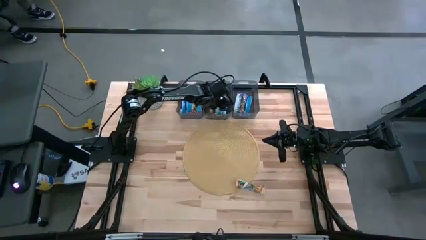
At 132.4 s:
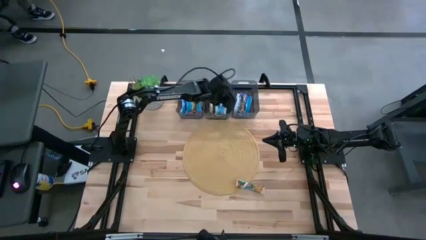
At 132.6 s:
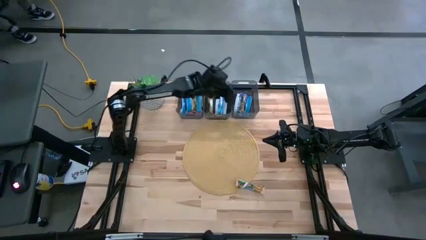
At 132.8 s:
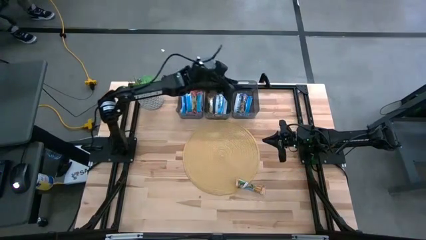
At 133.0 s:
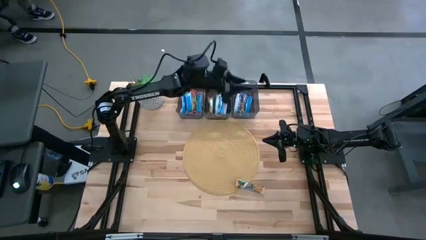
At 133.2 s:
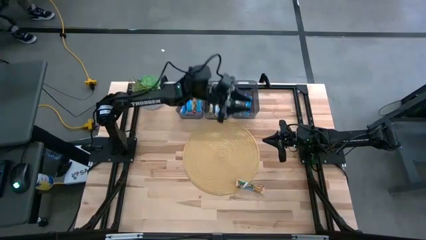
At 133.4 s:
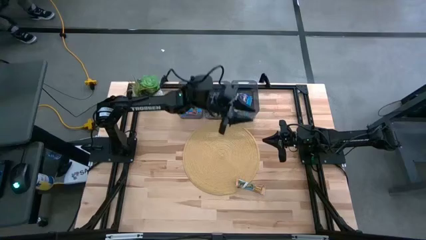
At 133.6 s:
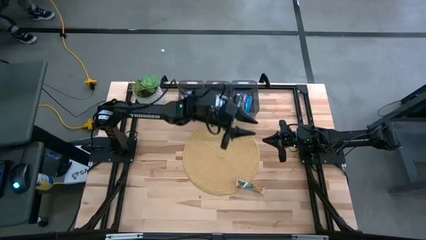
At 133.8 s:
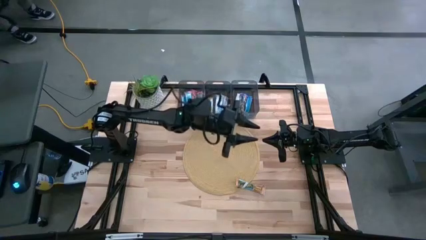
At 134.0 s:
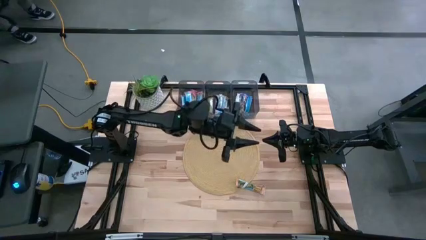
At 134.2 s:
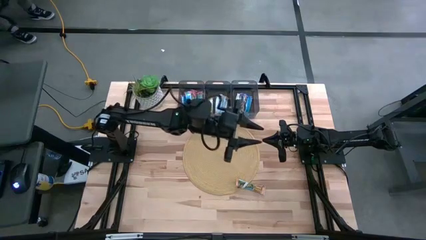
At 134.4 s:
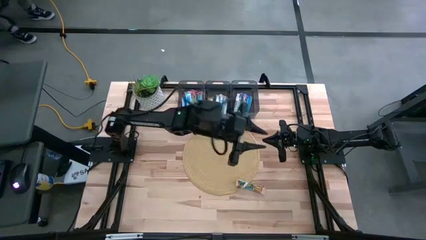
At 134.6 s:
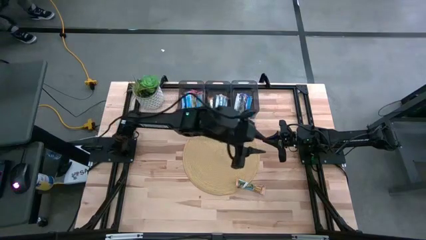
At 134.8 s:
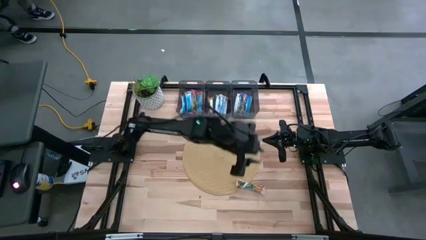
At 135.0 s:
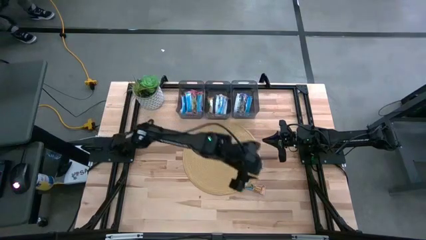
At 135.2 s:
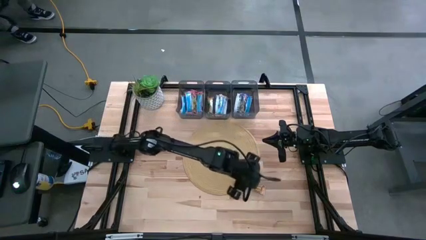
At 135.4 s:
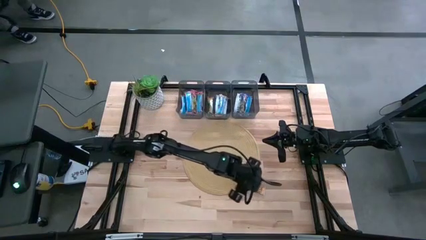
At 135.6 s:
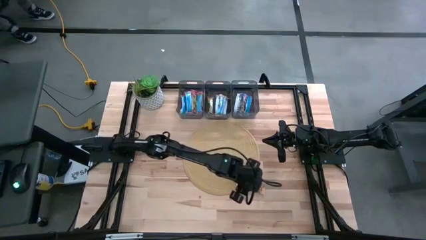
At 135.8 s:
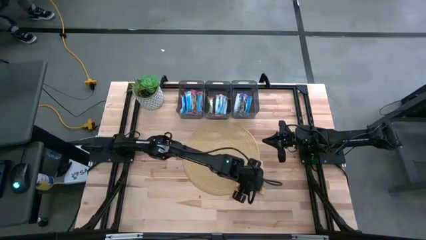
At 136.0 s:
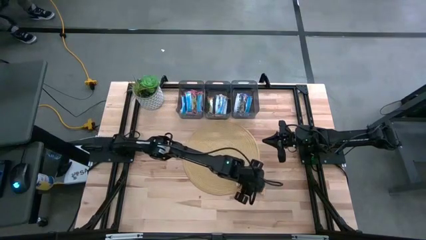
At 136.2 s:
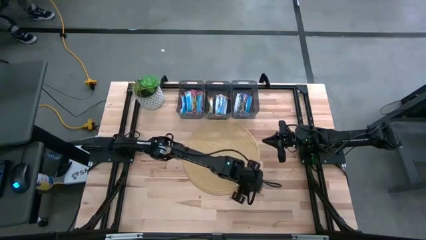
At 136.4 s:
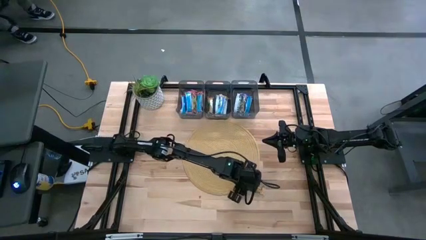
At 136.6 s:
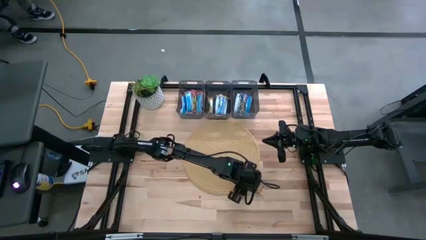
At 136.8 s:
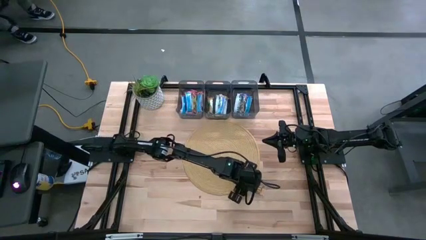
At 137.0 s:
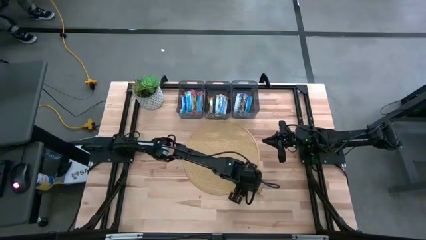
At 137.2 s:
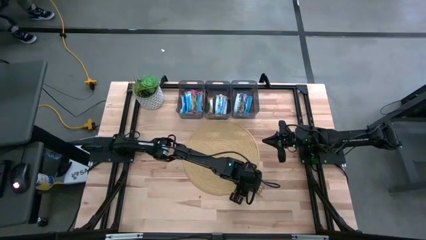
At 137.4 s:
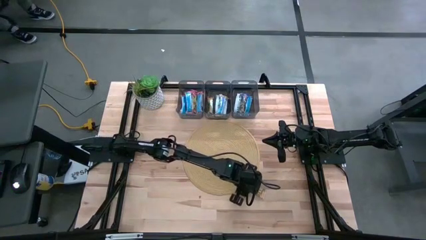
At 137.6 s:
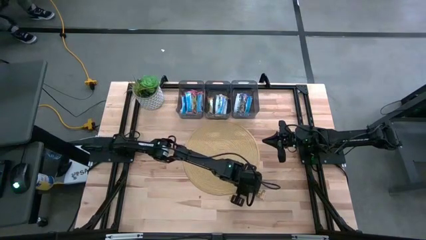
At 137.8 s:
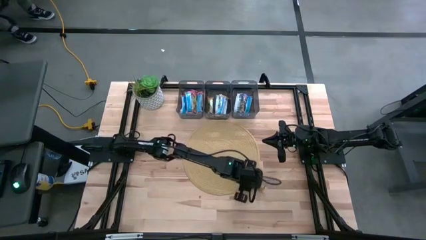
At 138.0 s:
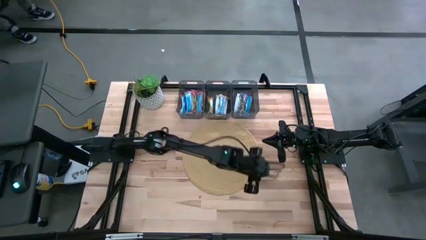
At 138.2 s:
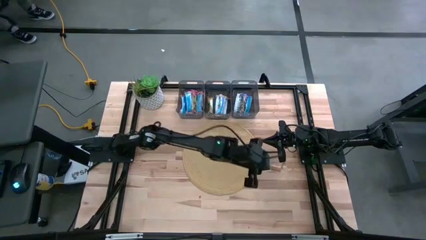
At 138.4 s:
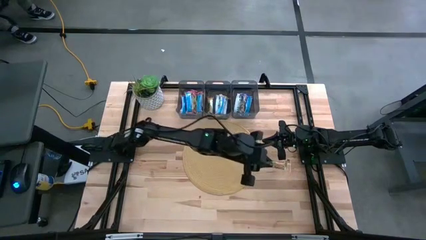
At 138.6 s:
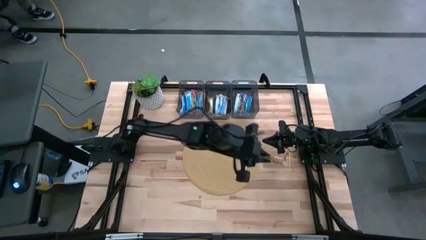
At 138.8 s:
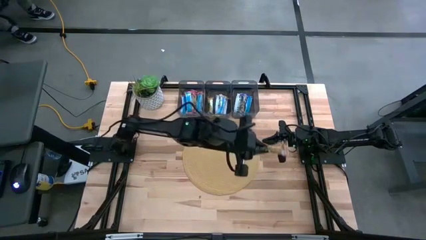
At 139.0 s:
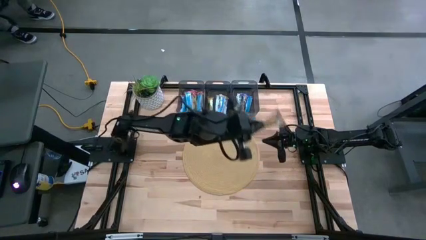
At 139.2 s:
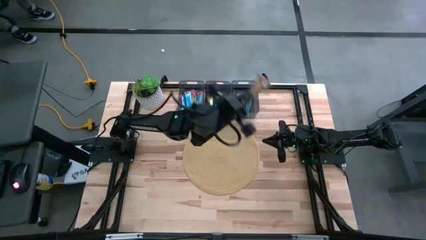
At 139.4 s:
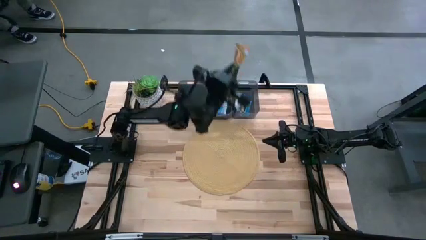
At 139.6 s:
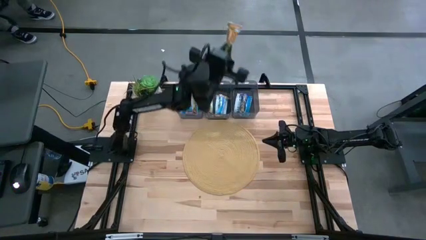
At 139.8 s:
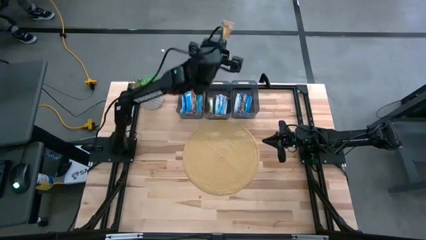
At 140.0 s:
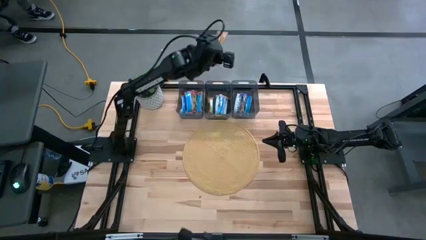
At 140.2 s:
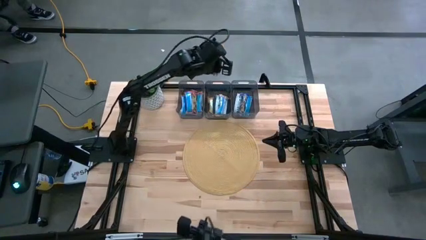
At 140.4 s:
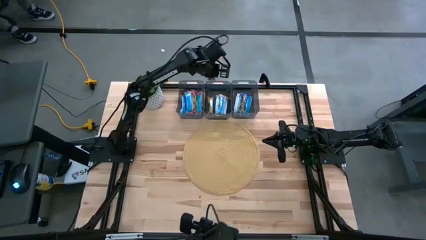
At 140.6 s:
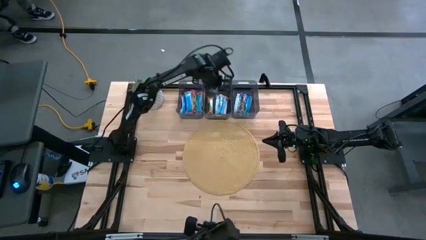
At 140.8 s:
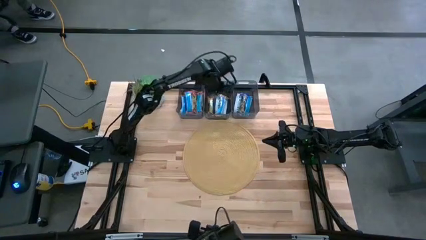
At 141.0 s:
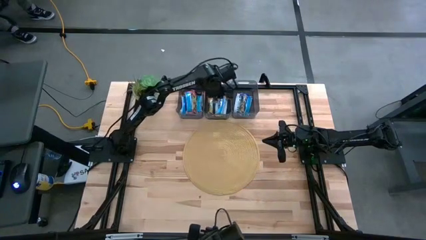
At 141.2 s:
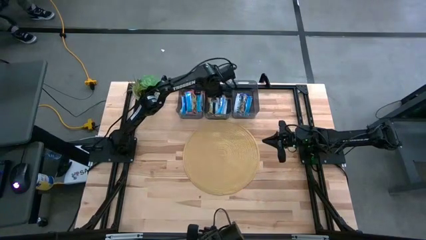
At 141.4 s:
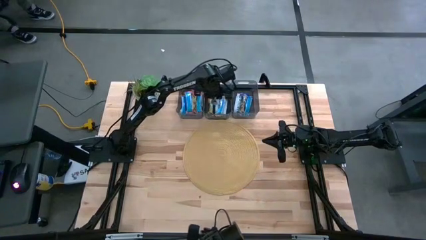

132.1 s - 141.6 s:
Task: Pick and place Granola Bars by type
Put the orange granola bar into the center black bin

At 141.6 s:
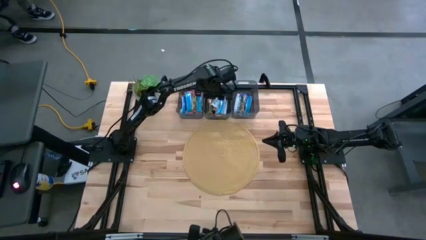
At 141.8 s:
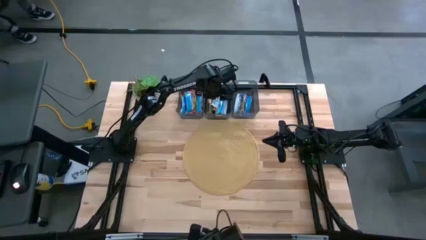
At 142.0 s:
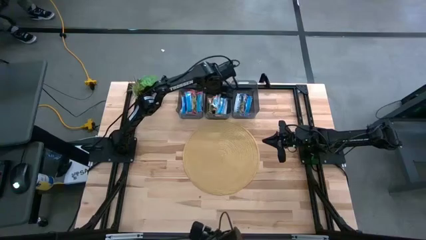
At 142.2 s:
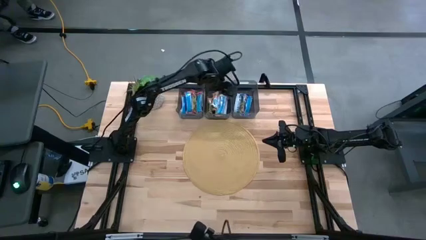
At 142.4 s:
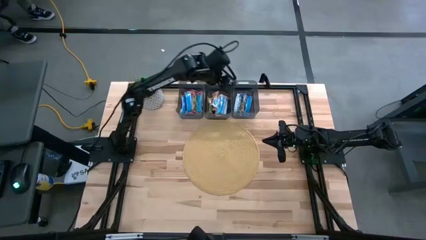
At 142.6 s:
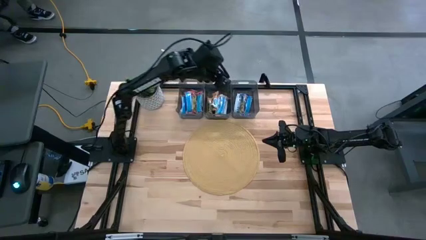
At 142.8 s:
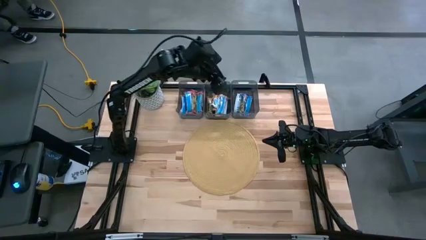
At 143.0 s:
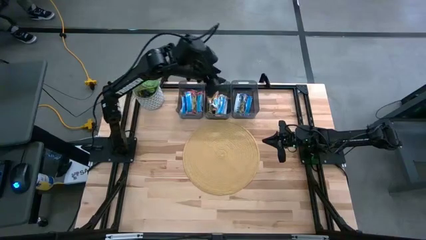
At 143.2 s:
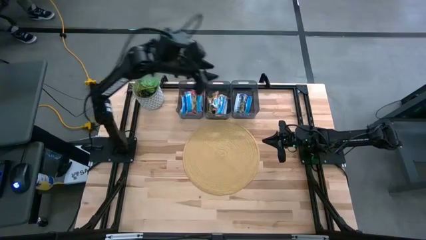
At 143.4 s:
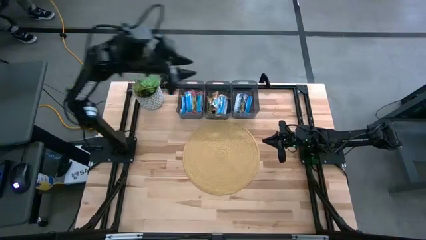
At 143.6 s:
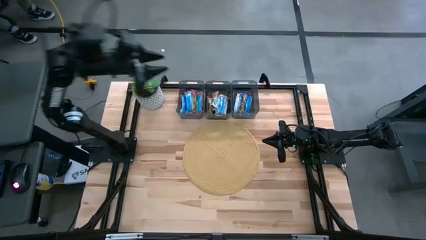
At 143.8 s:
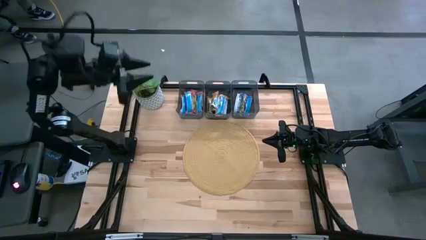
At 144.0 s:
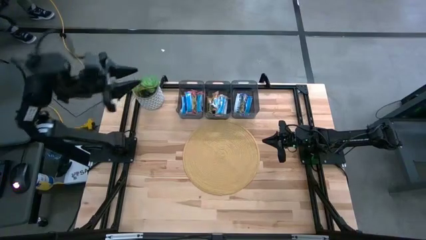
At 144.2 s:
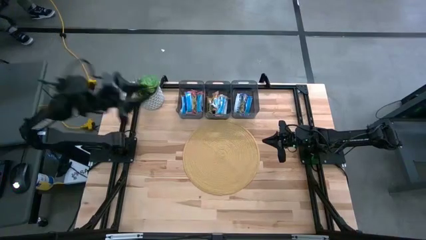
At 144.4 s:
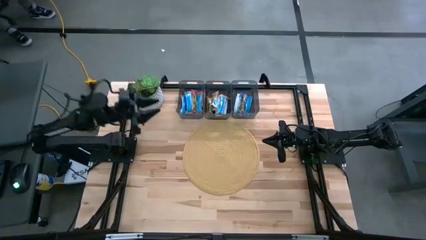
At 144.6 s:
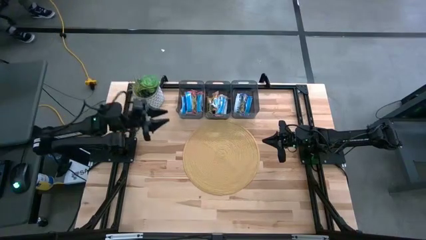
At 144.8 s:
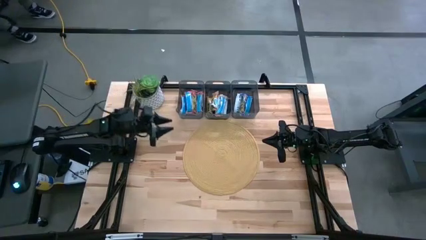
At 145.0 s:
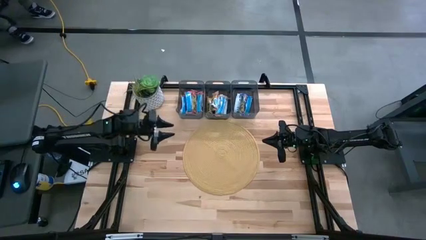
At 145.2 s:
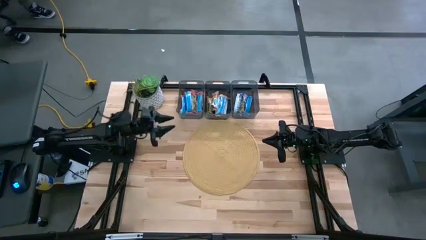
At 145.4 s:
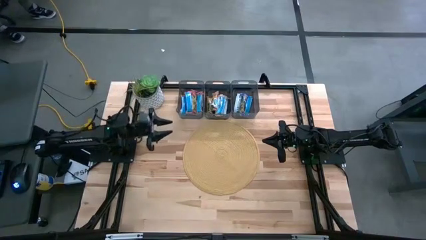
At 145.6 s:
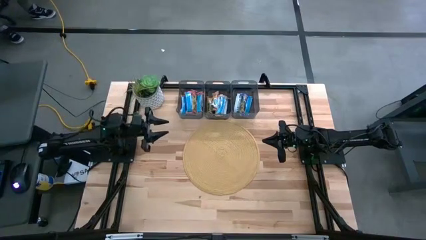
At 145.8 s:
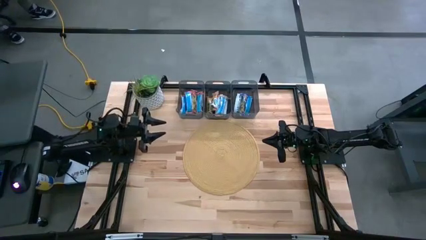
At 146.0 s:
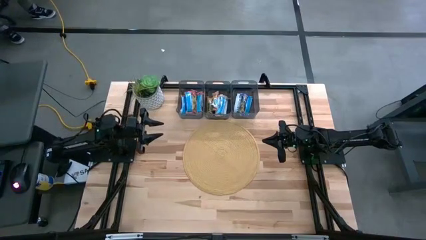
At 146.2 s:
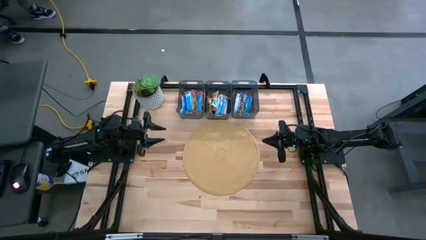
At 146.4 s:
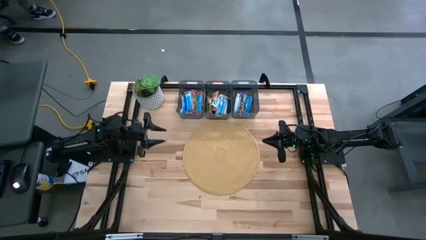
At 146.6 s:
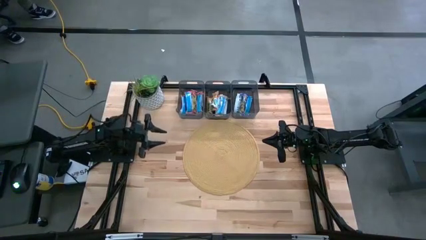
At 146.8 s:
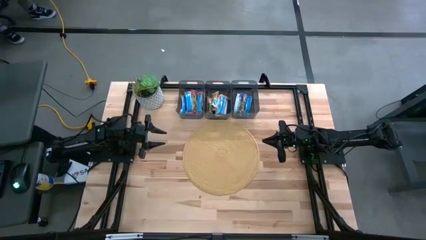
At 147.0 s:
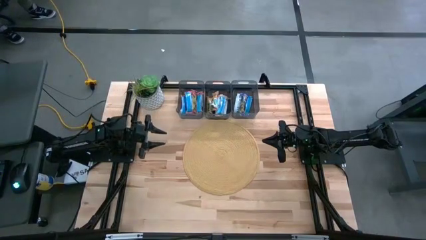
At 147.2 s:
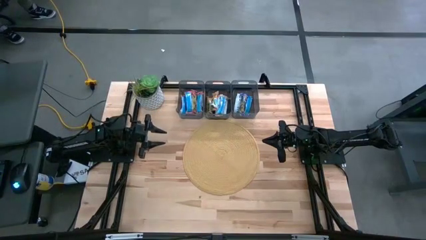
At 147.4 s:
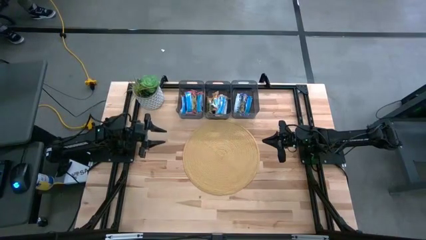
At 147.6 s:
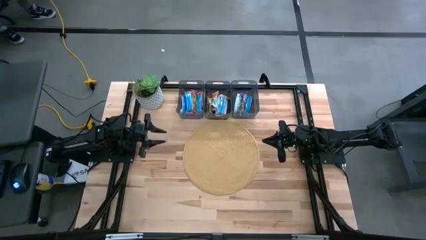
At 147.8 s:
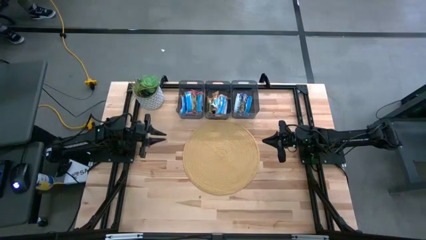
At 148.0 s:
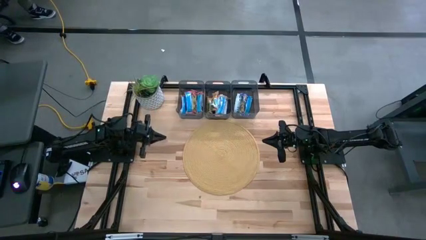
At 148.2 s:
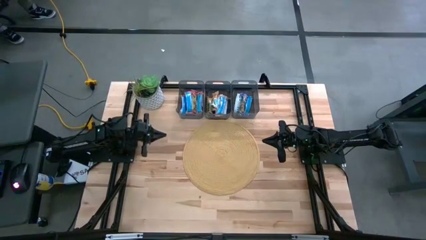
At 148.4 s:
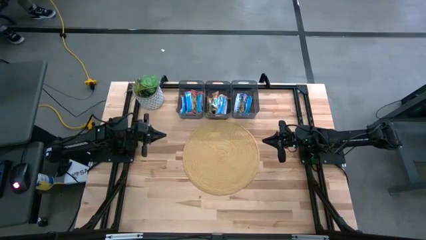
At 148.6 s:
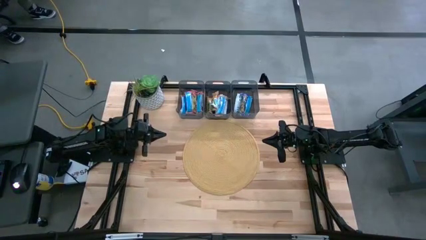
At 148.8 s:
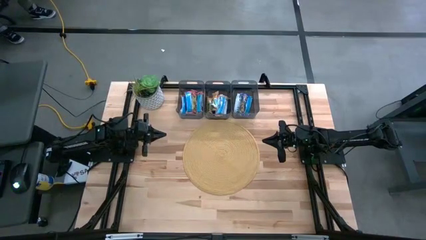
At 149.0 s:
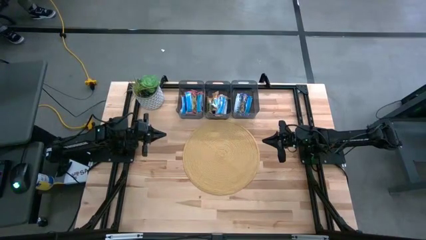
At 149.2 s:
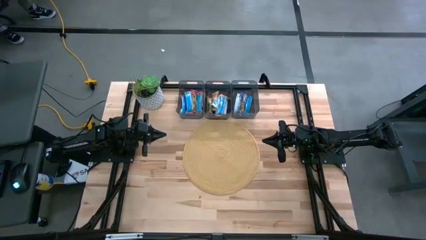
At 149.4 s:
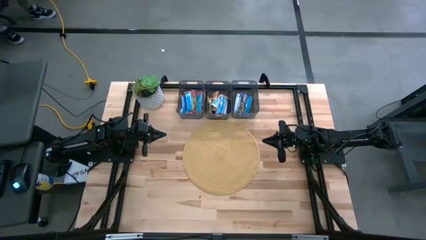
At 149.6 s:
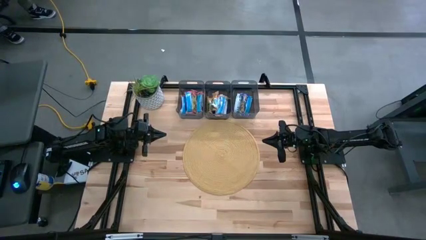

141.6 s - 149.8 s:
Return to Home Position
